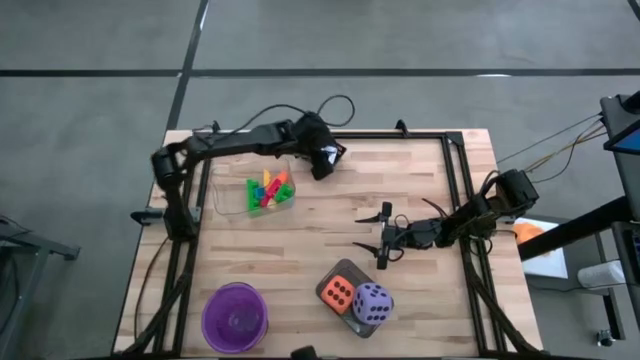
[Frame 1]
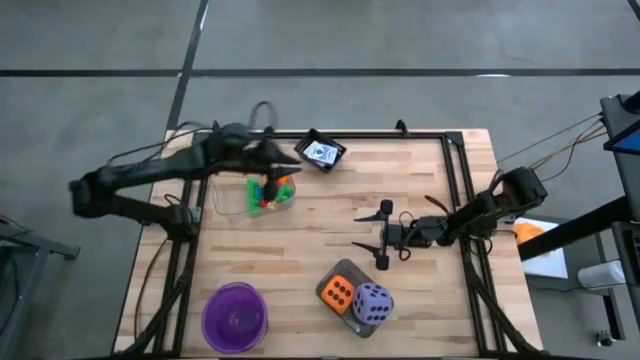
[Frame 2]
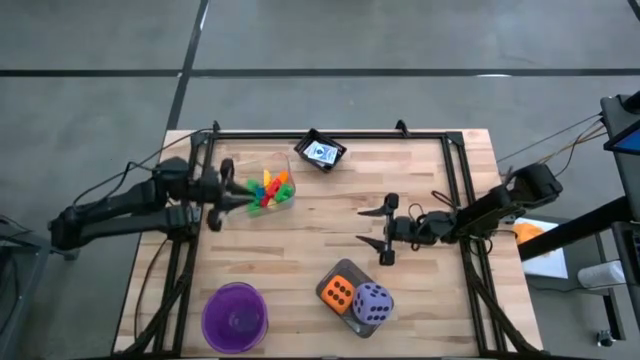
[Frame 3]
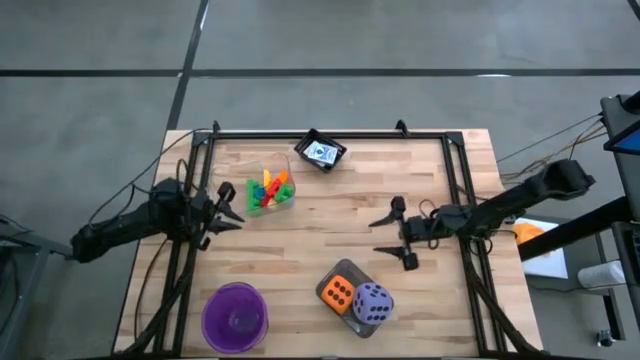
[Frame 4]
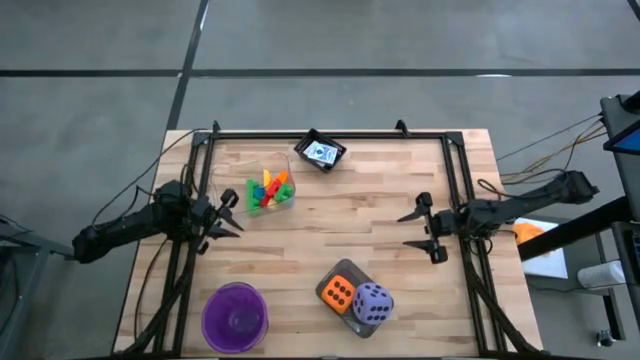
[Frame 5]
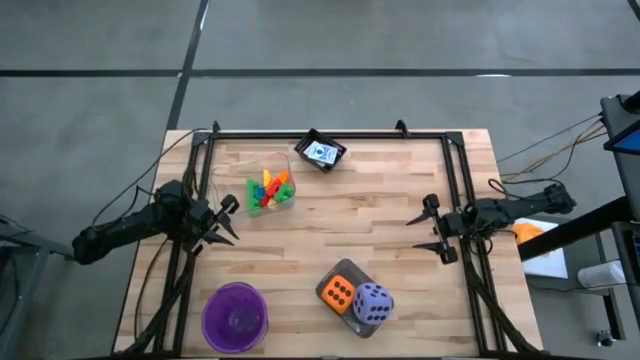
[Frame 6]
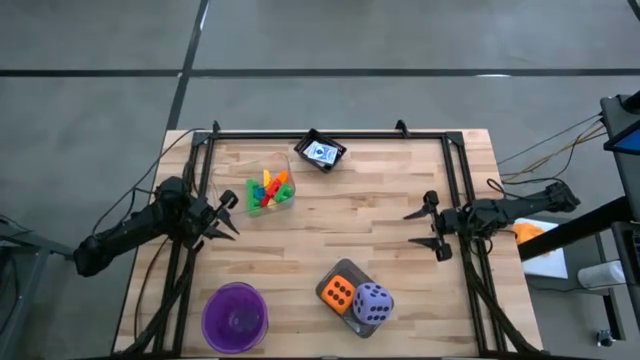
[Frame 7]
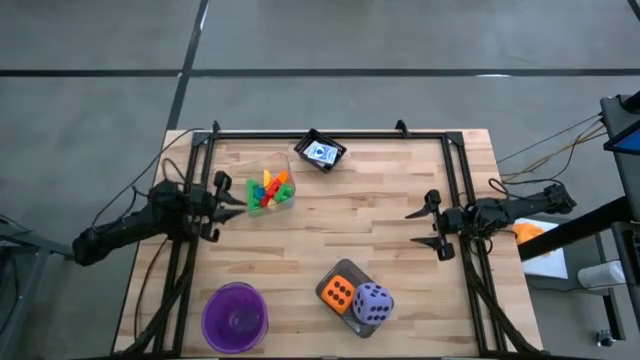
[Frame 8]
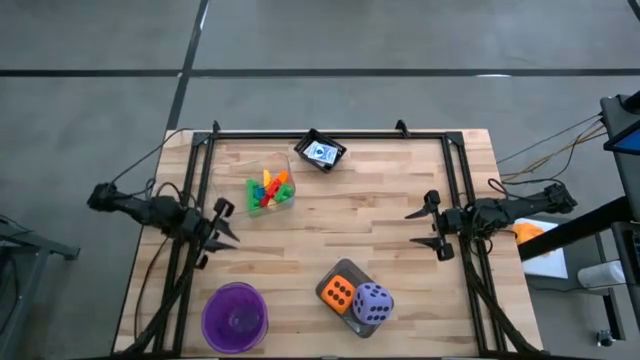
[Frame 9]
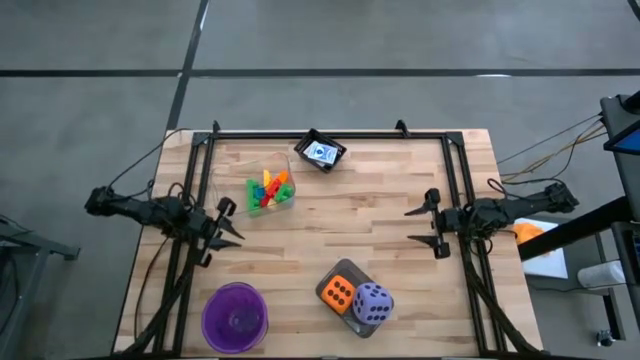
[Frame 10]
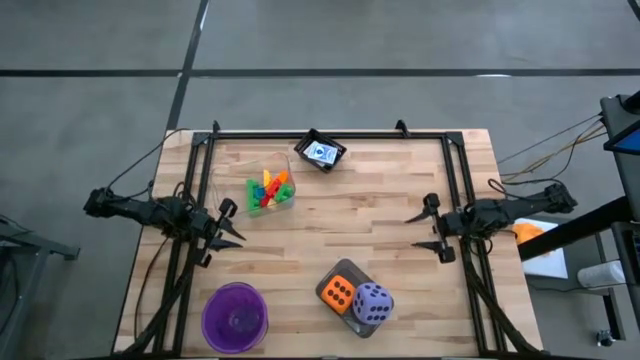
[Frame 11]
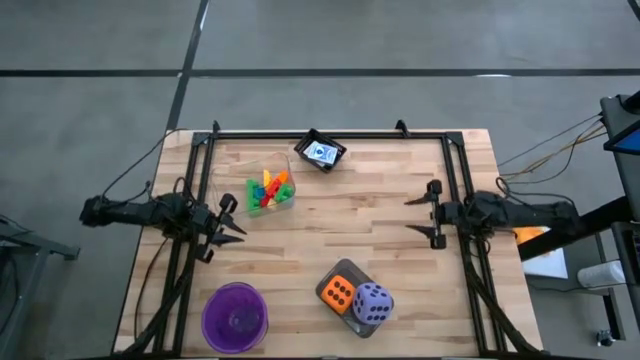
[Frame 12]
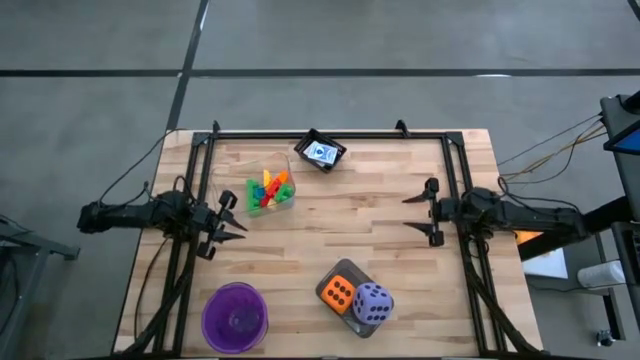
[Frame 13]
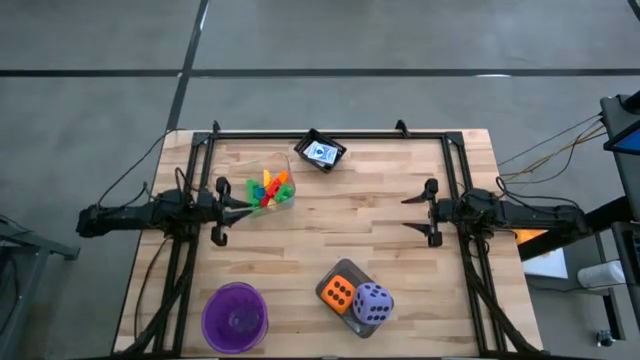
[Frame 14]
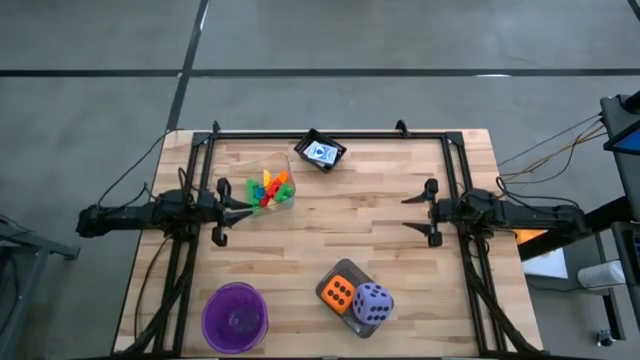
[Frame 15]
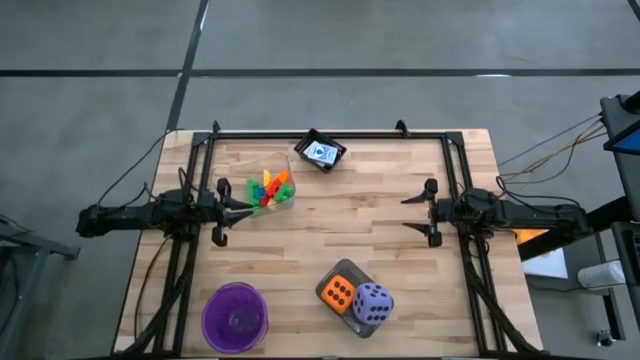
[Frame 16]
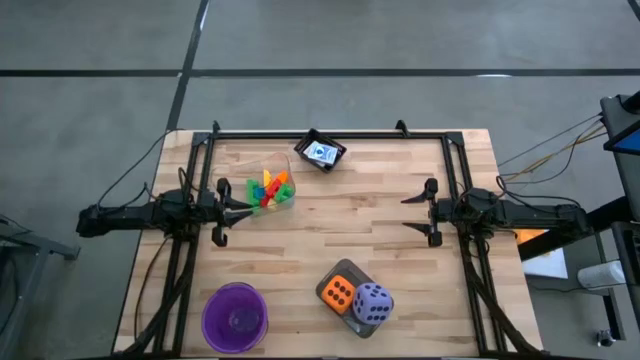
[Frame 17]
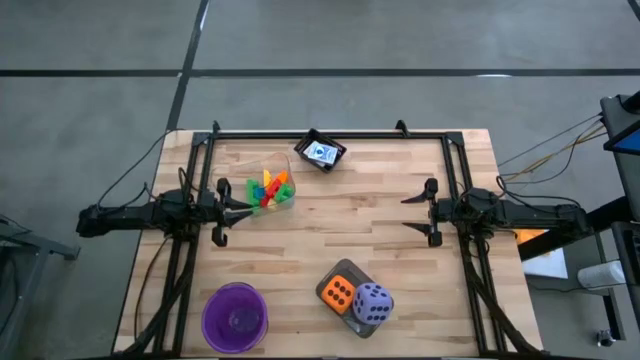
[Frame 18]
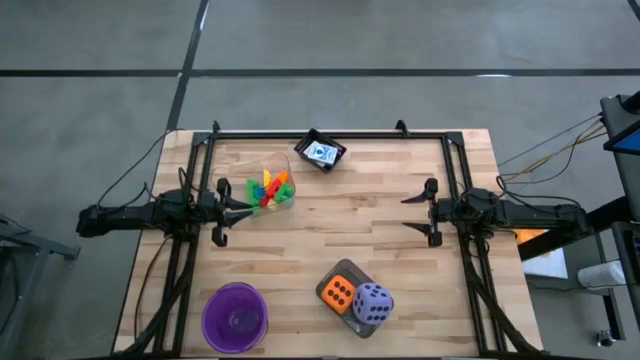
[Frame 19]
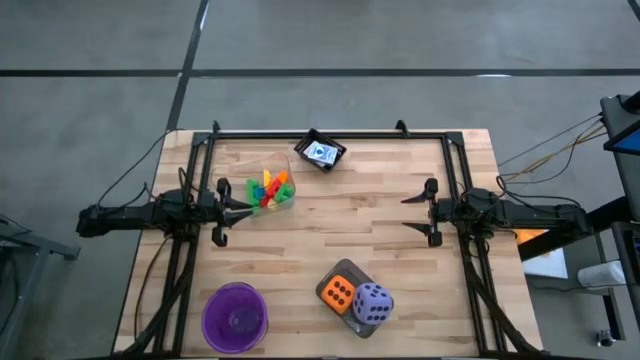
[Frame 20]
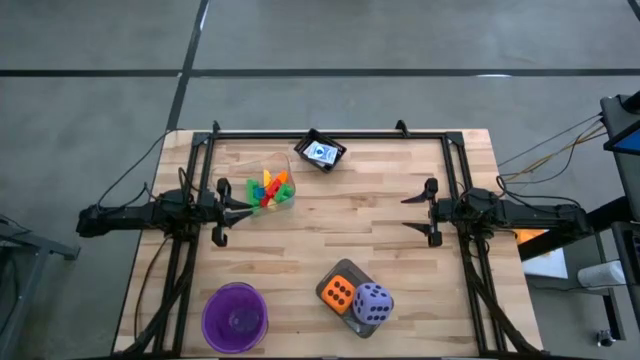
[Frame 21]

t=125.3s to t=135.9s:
Task: Pick & Place Toys
Return to Home Position

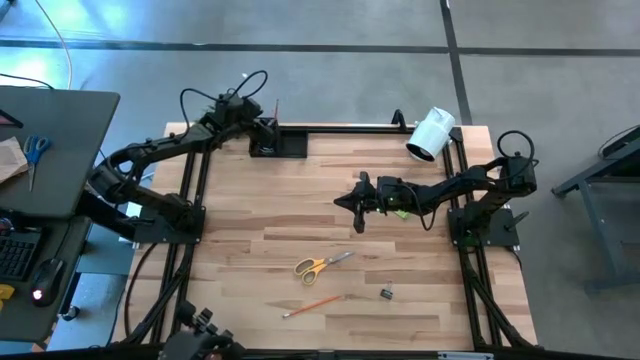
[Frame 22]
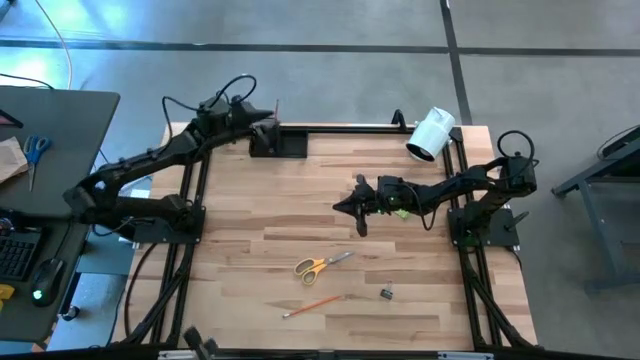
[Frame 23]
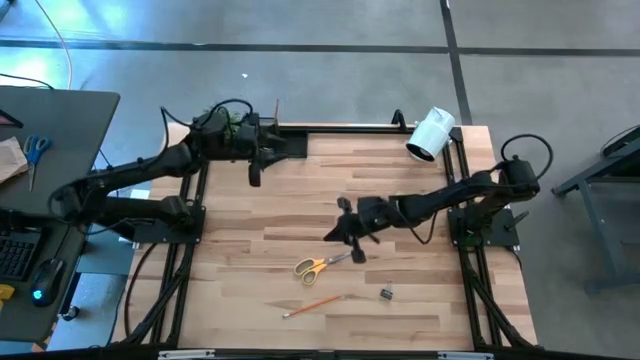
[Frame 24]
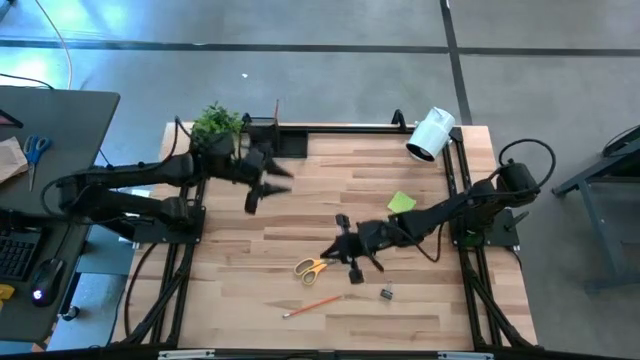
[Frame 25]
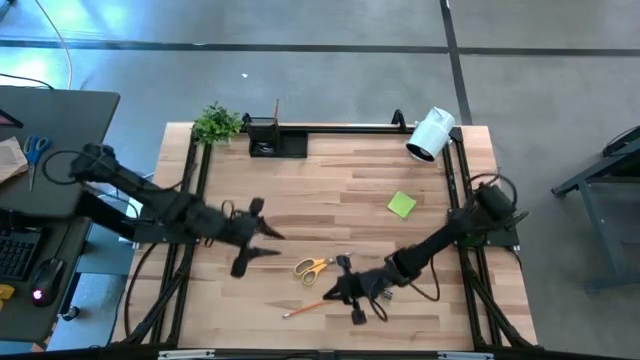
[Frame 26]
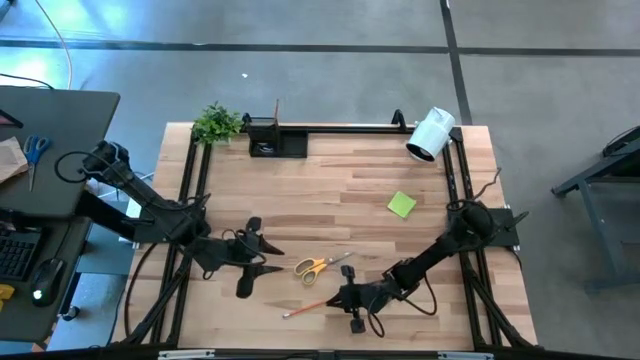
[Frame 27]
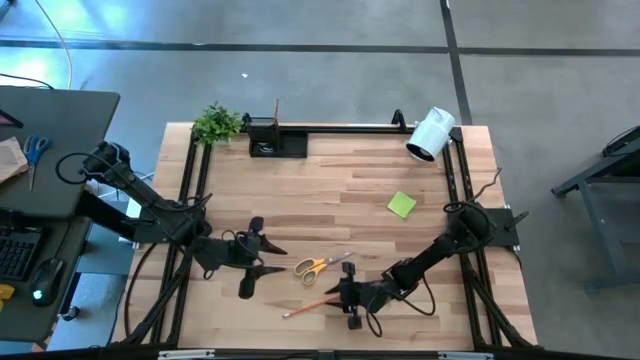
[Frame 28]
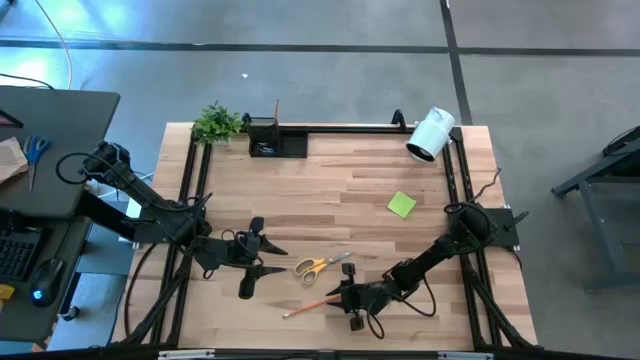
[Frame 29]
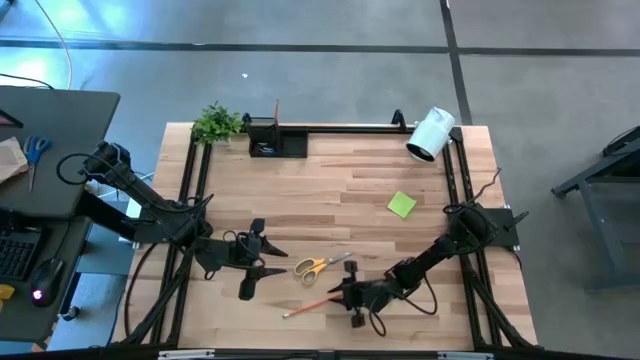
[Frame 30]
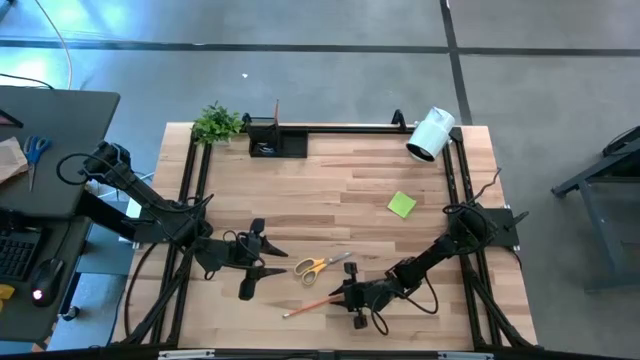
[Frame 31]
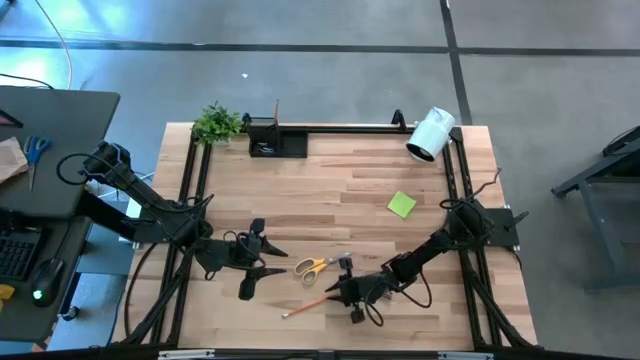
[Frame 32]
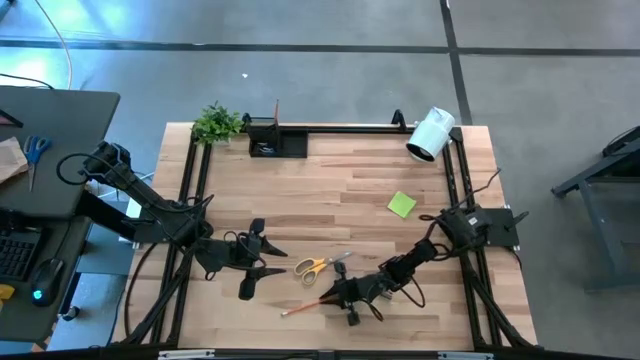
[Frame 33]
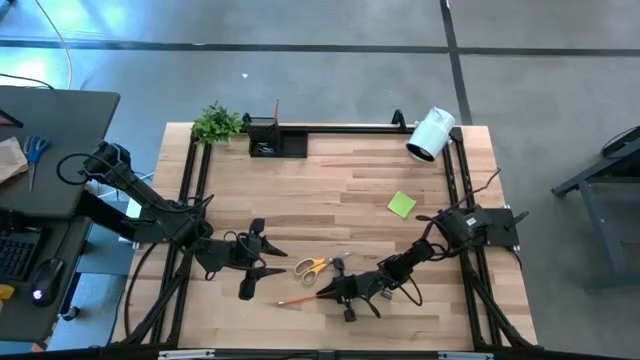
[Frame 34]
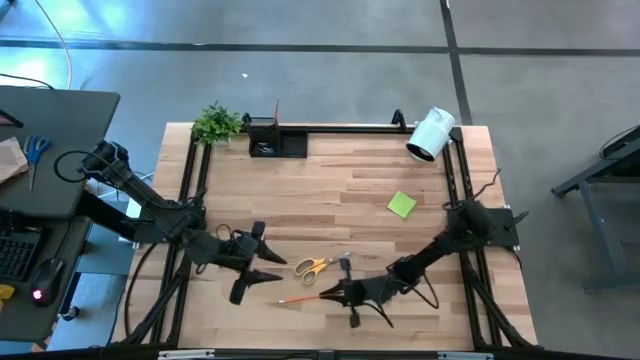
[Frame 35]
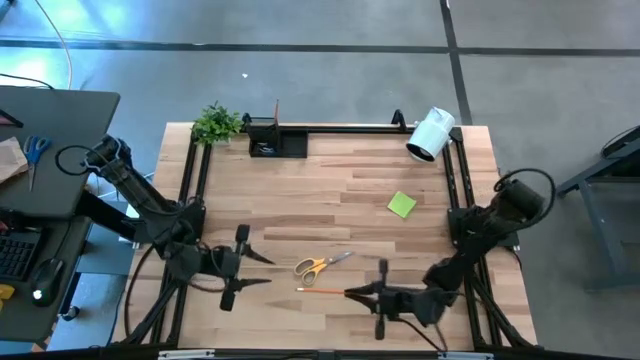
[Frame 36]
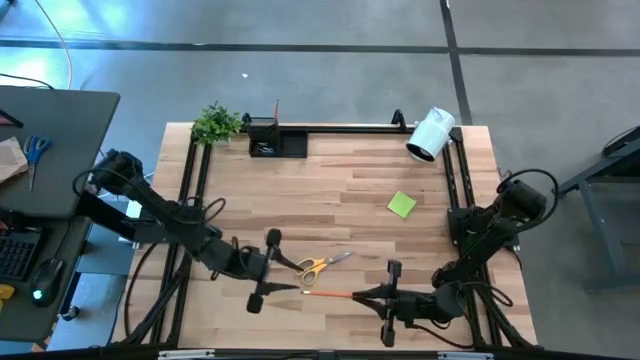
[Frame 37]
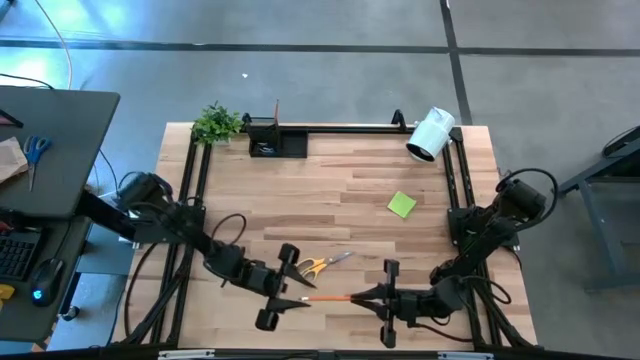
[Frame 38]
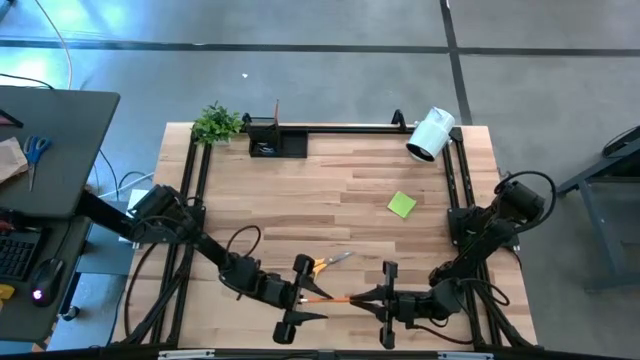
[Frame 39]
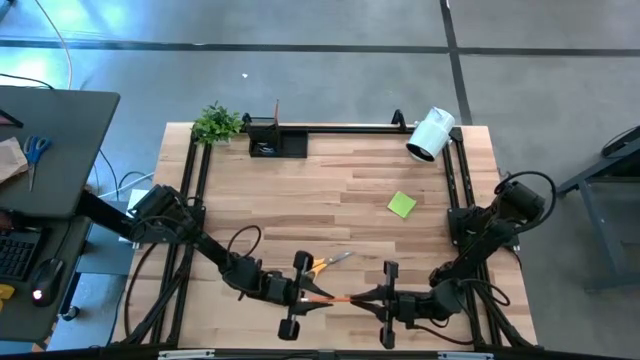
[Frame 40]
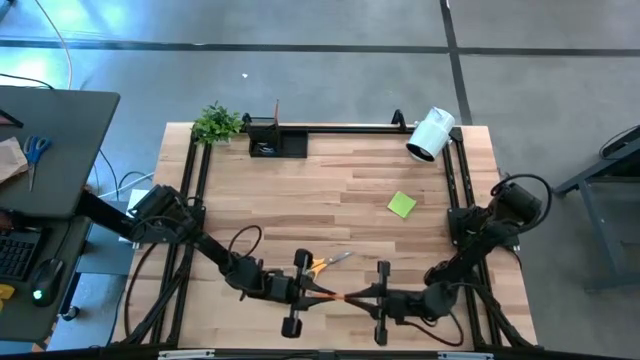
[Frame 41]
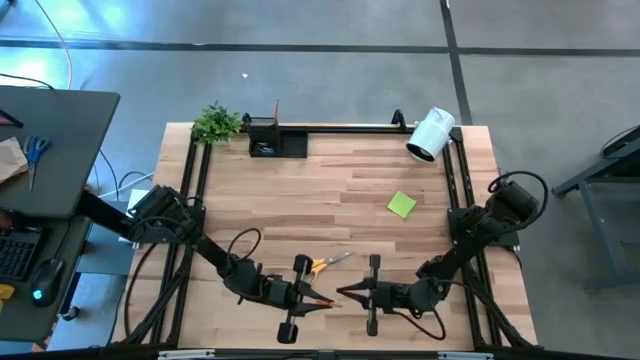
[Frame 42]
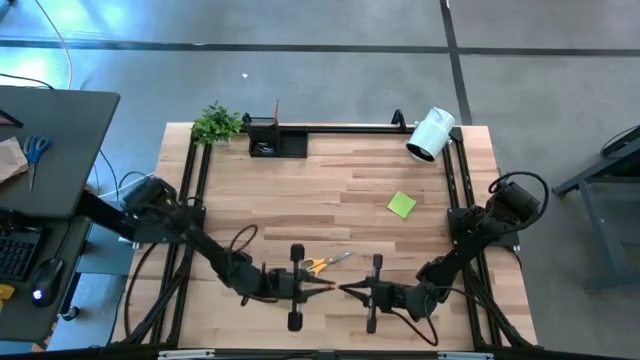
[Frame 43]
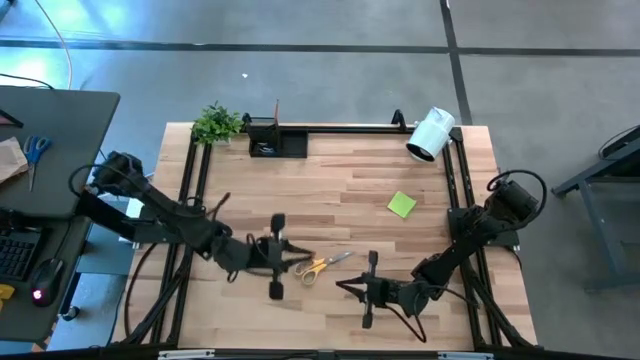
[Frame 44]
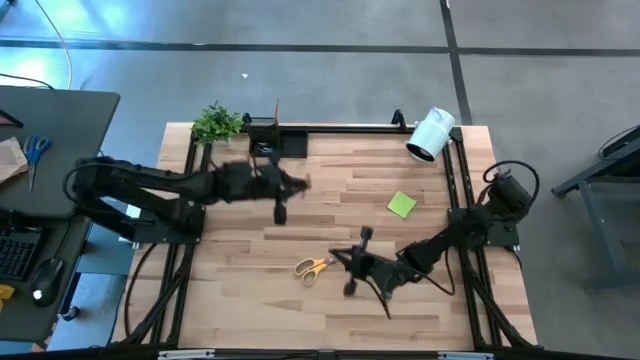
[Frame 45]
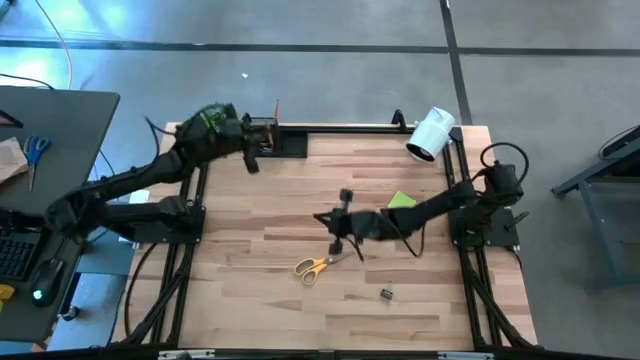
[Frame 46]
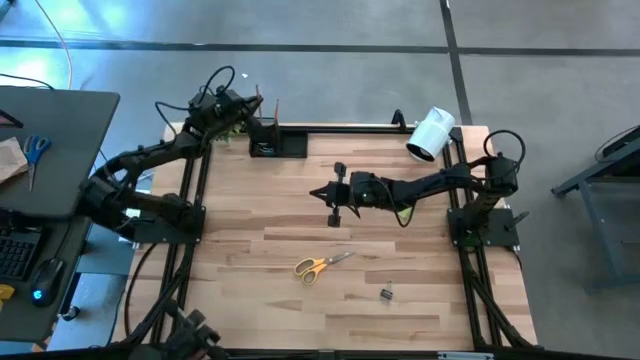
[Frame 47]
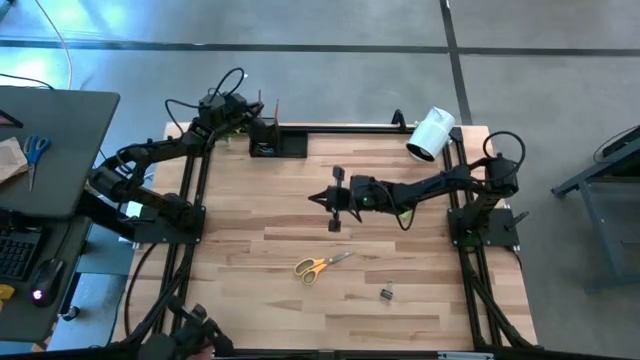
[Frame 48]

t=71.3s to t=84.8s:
Task: Pick and place office supplies into organizer
Put the orange pencil into the top left section of the desk organizer
